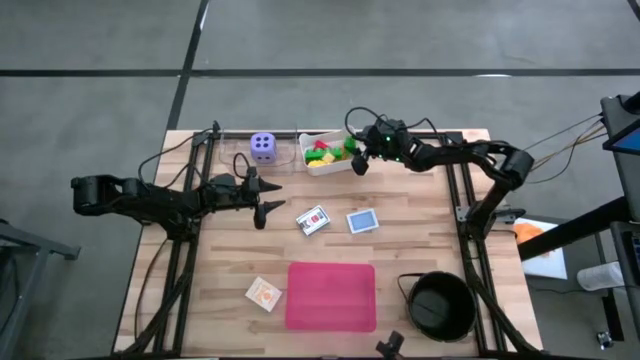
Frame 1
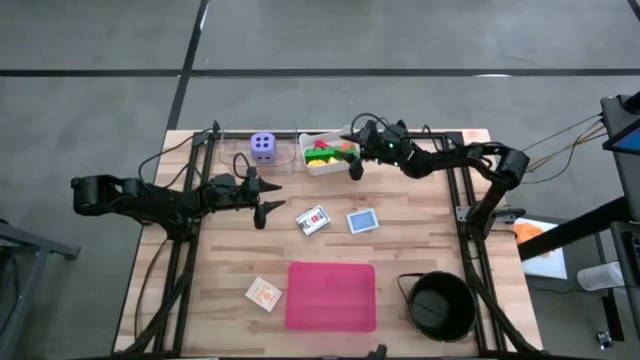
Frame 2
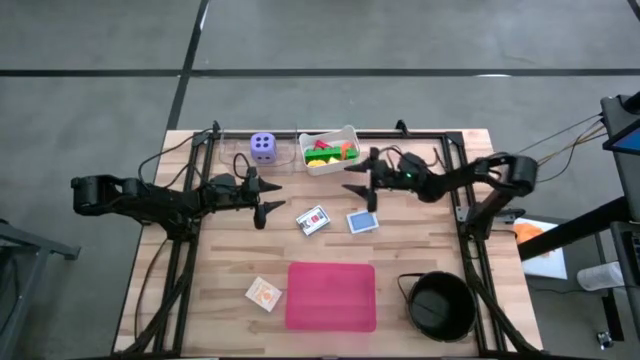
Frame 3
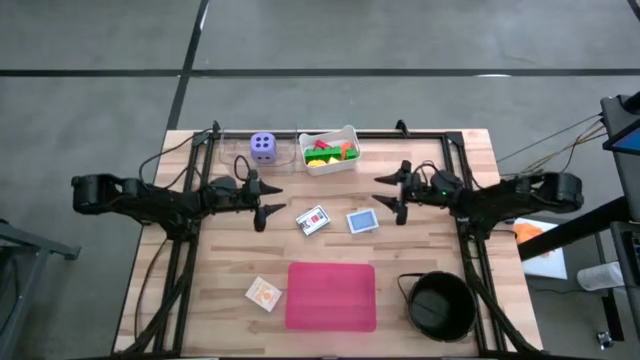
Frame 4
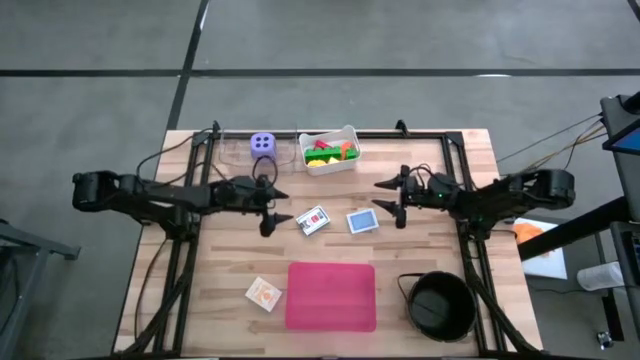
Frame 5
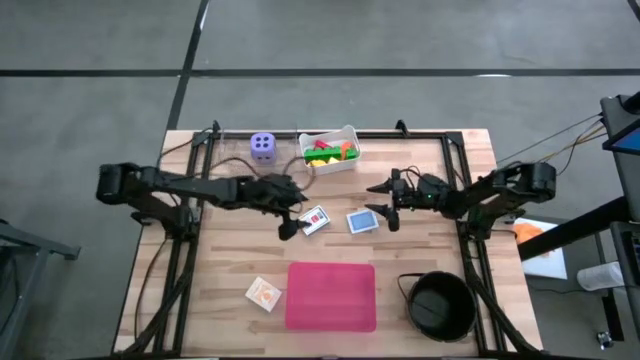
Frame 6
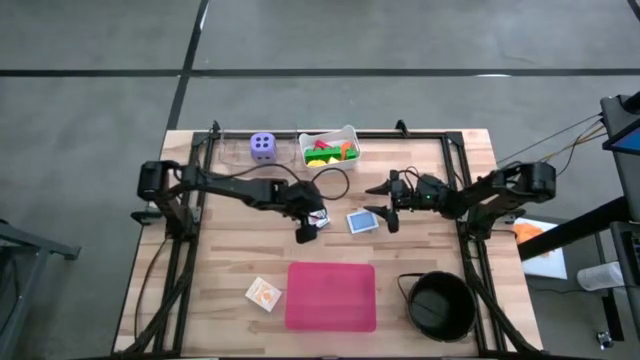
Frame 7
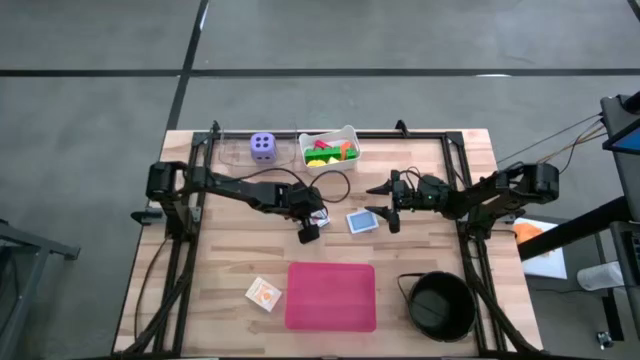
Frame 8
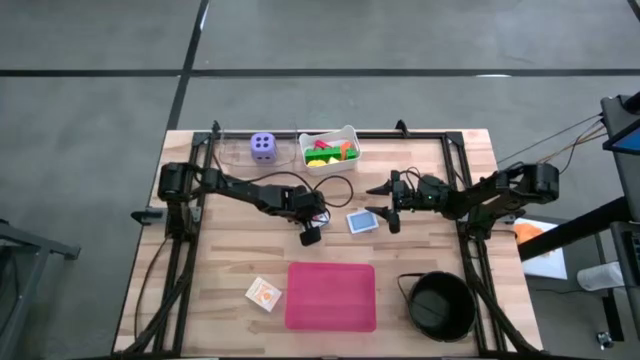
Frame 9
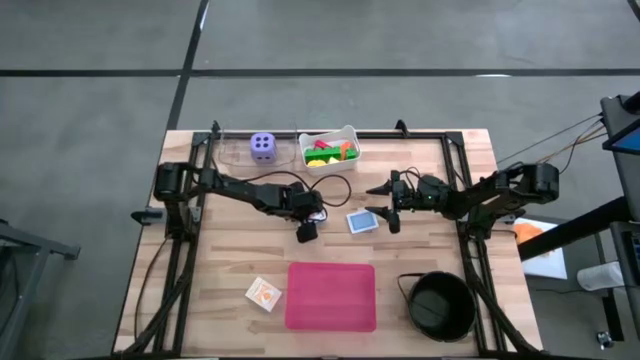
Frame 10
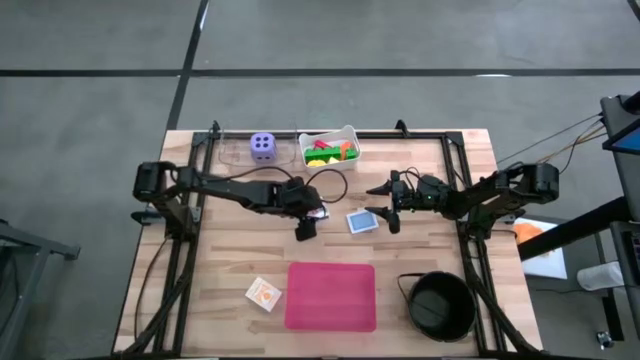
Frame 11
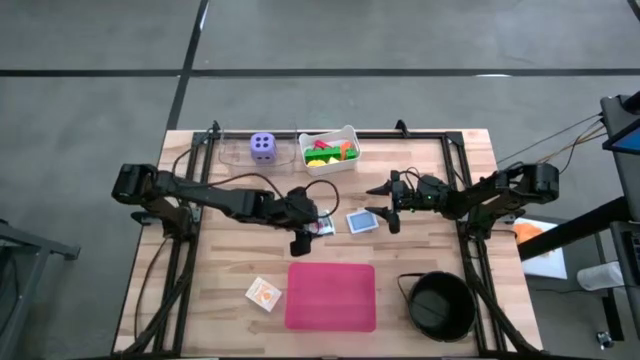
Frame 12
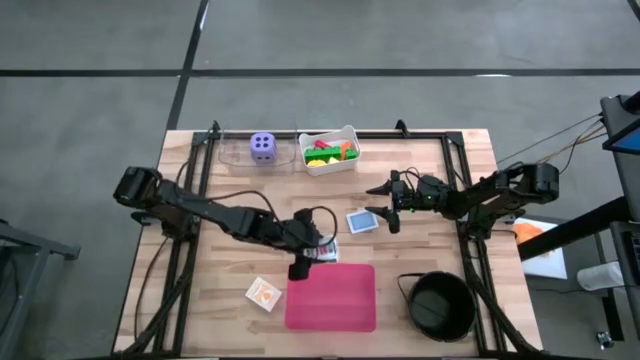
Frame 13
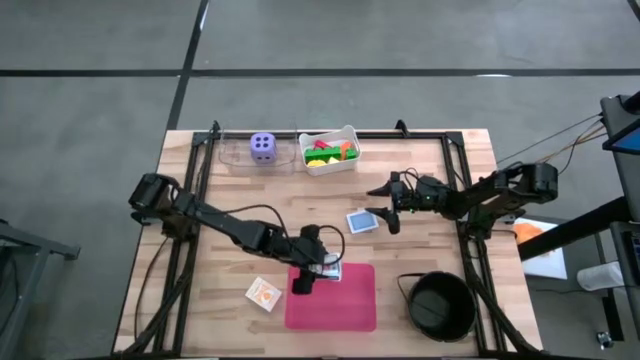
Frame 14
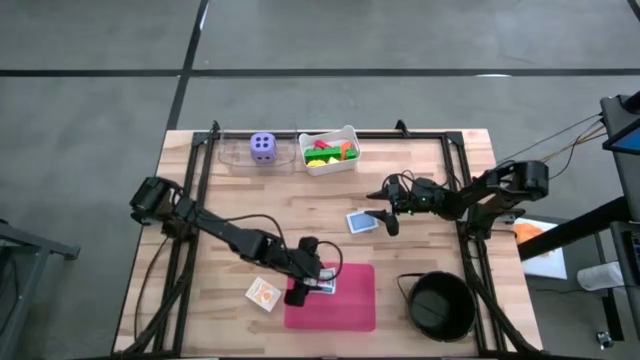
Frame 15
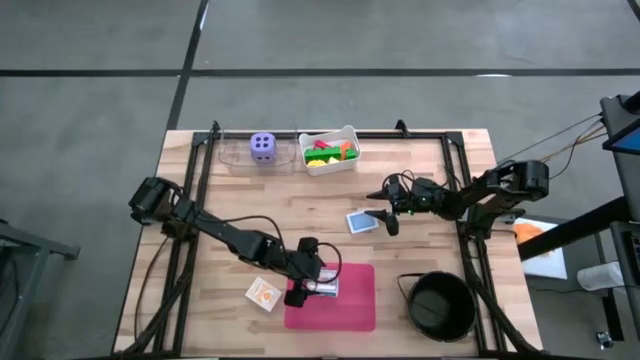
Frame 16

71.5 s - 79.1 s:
Task: Pick & Place Toys
Put the white deck of cards into the red bin

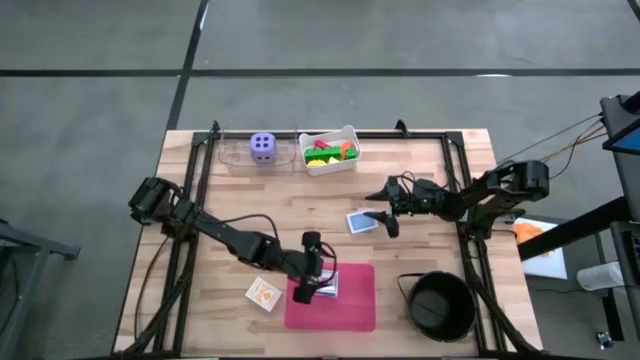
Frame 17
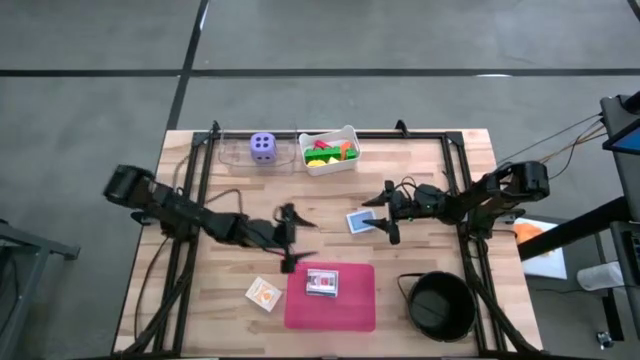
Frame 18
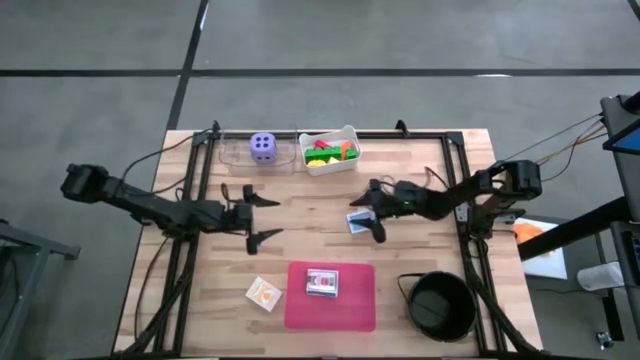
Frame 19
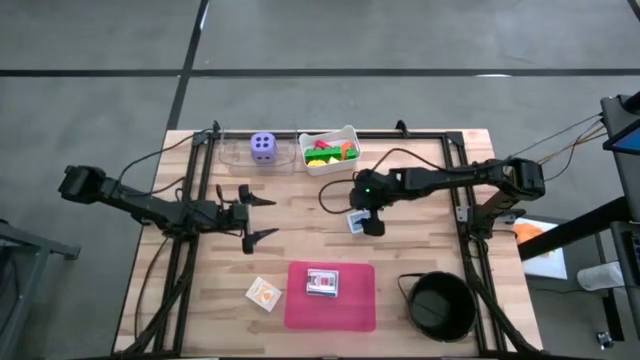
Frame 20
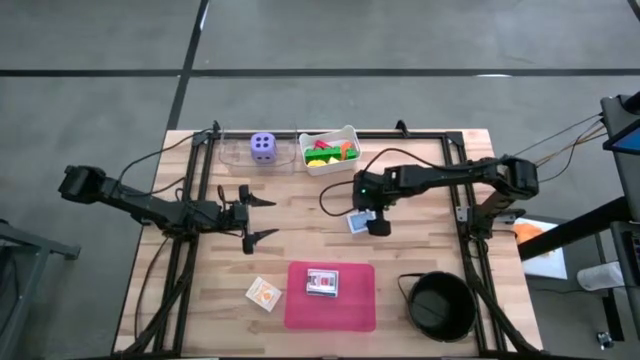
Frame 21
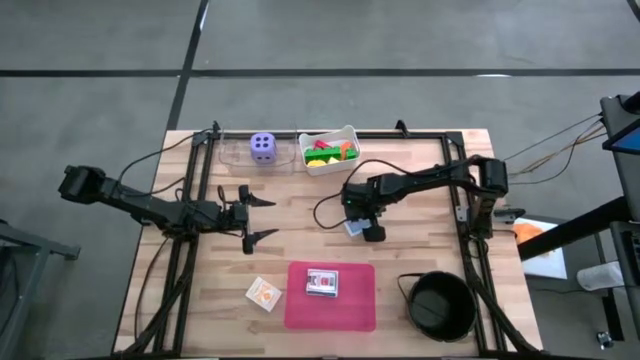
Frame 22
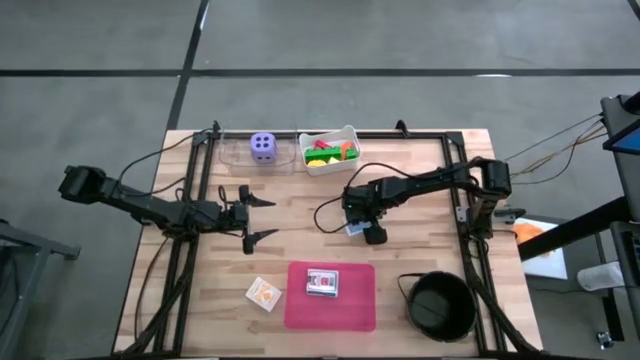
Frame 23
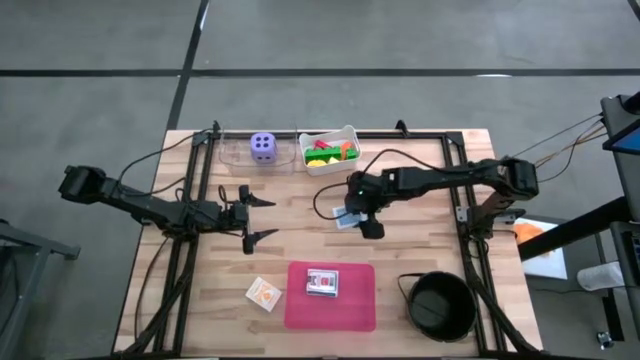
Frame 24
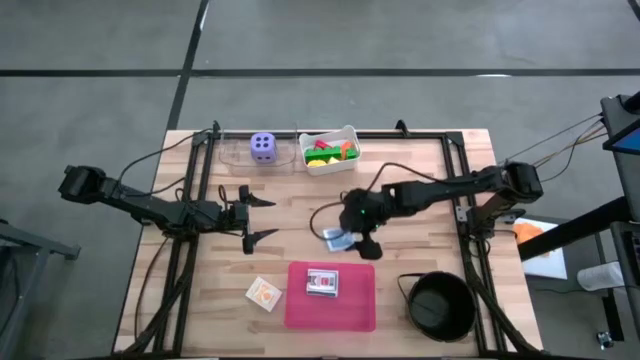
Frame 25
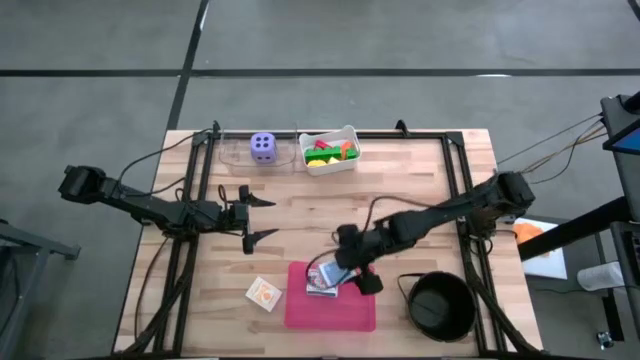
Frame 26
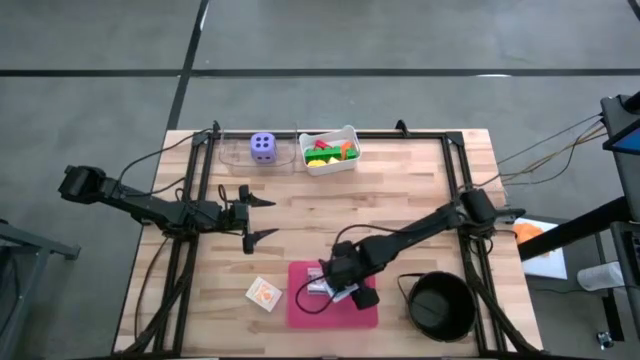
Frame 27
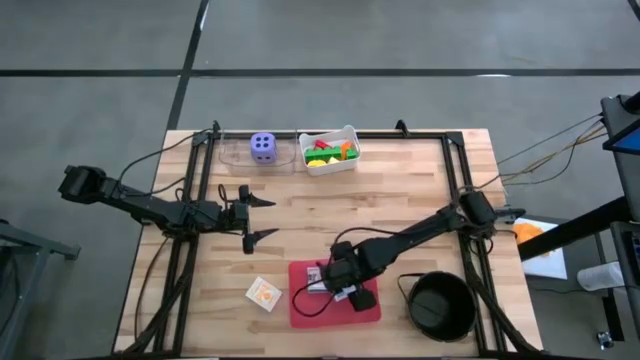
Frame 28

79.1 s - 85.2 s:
Put the blue deck of cards into the red bin

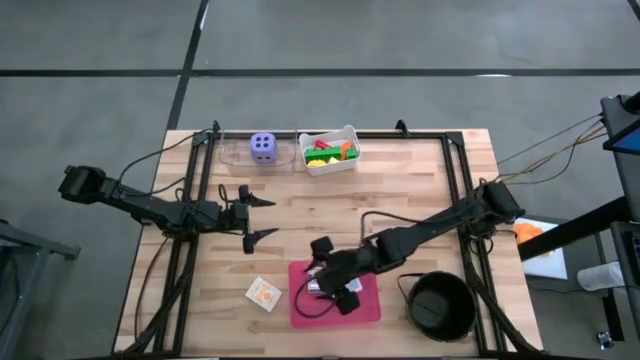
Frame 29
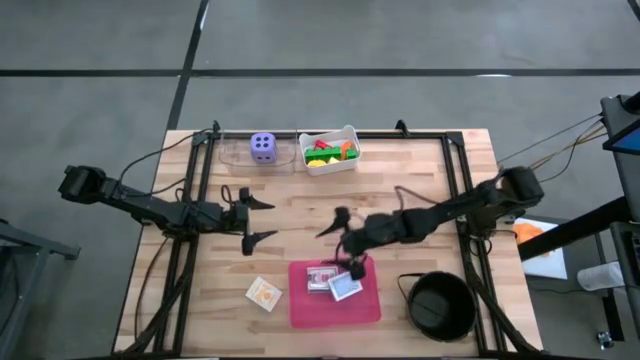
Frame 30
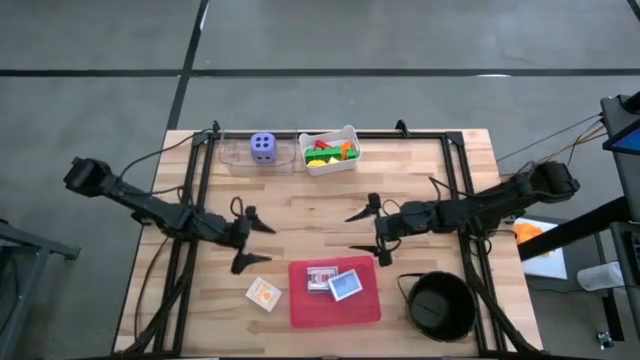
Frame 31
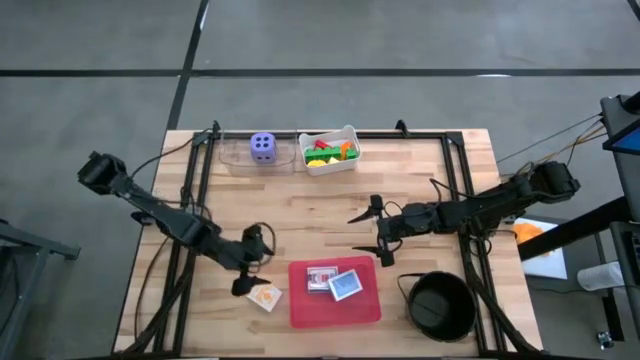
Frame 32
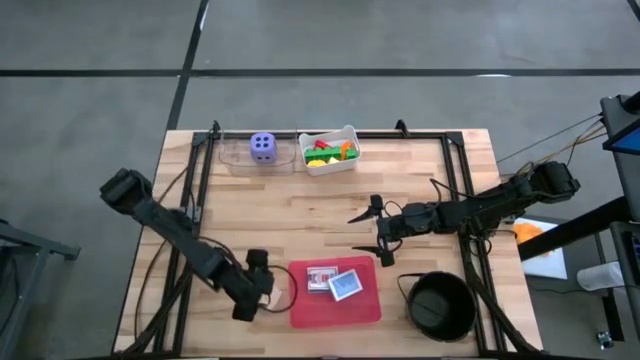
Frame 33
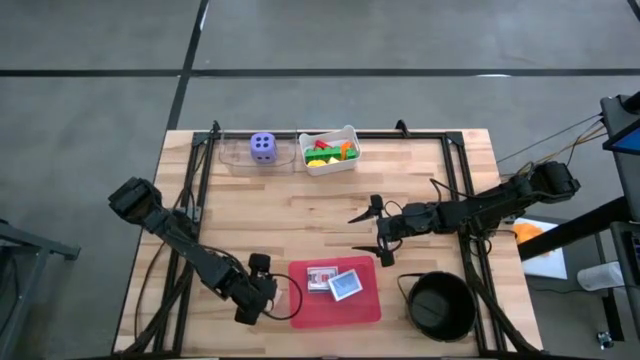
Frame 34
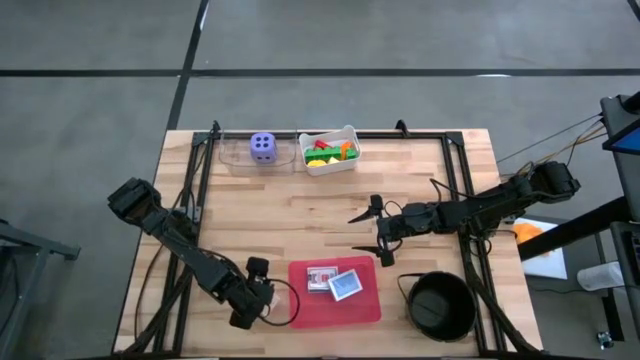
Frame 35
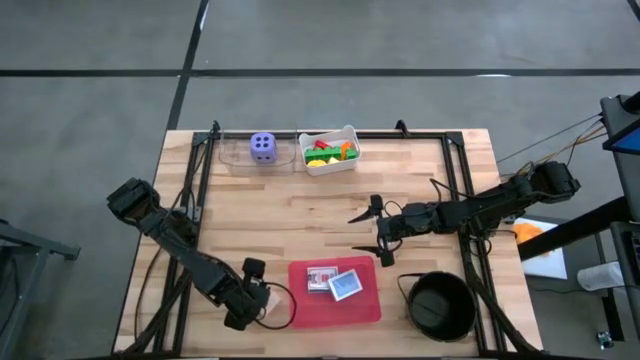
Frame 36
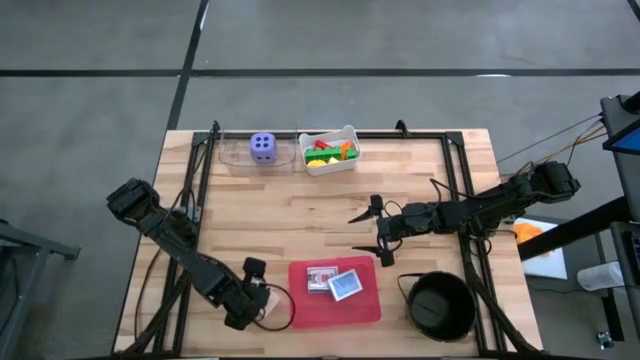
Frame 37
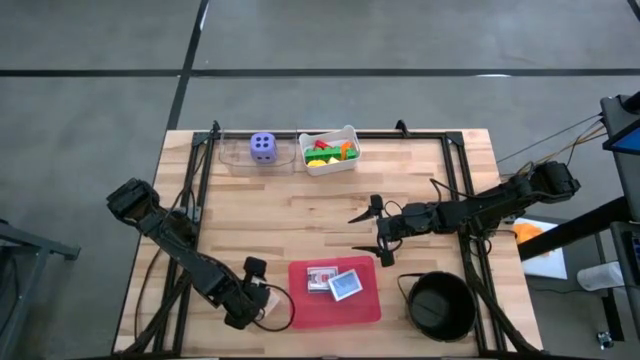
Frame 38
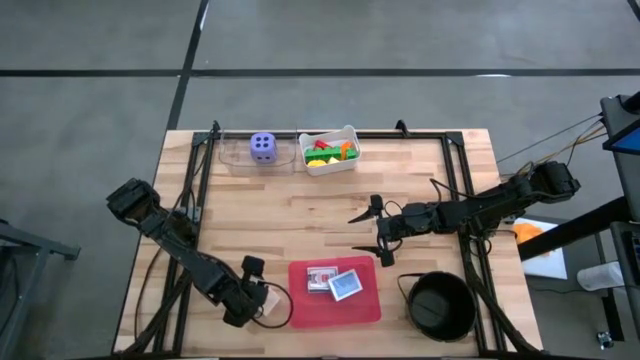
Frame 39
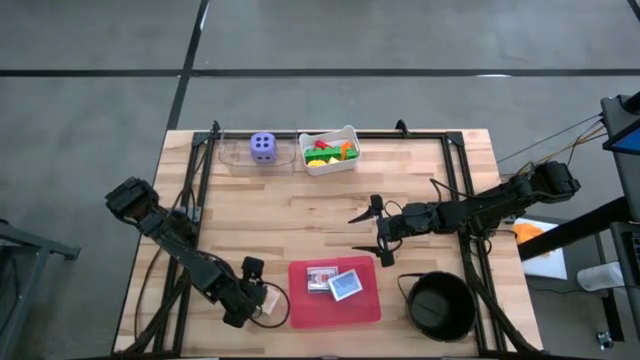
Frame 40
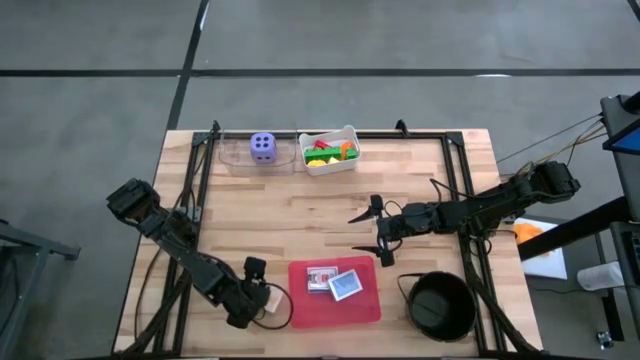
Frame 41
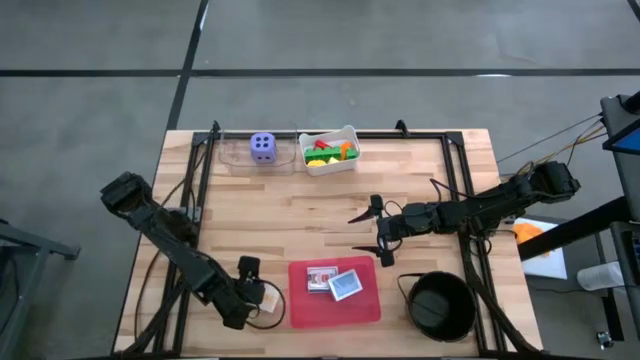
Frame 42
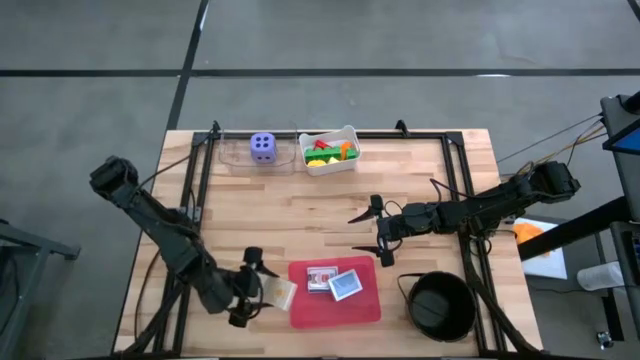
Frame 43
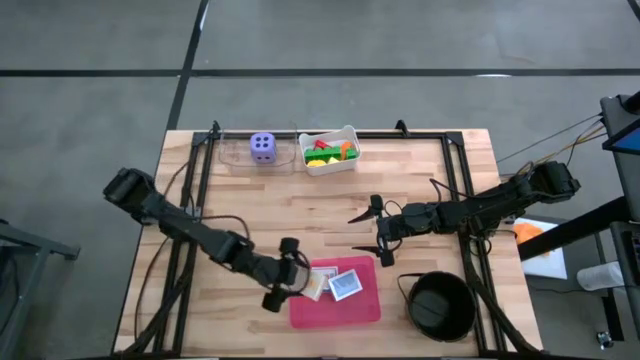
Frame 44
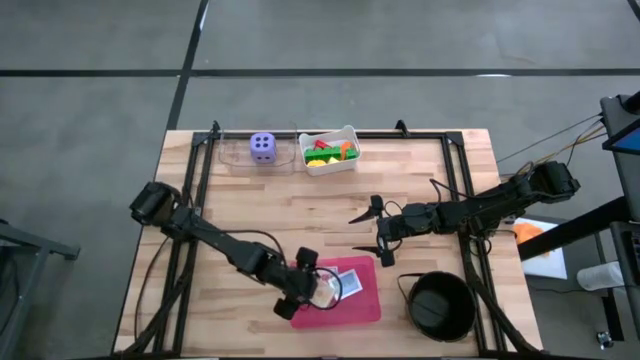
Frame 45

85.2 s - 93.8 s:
Put the orange deck of cards into the red bin
